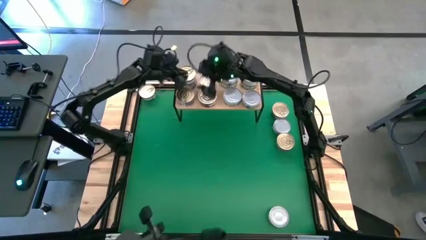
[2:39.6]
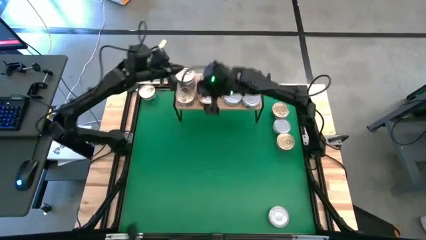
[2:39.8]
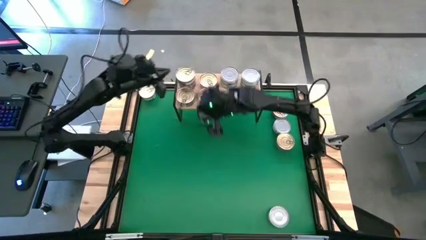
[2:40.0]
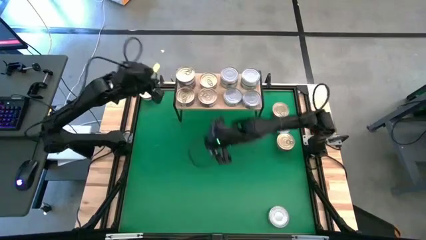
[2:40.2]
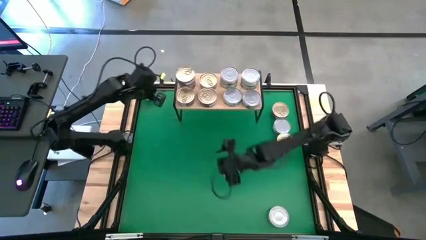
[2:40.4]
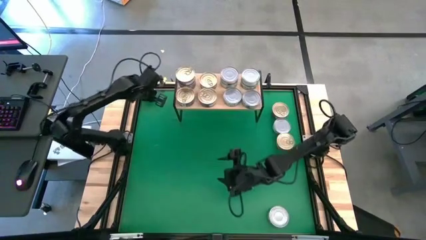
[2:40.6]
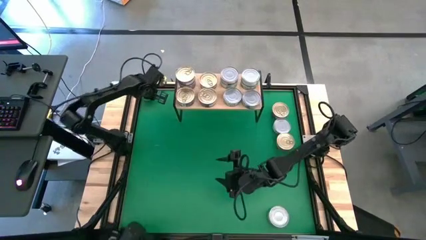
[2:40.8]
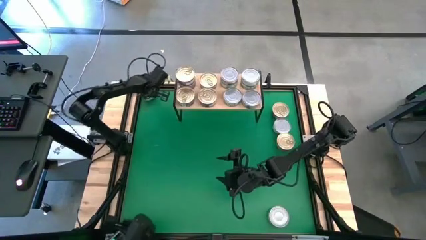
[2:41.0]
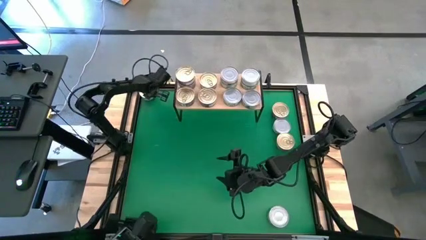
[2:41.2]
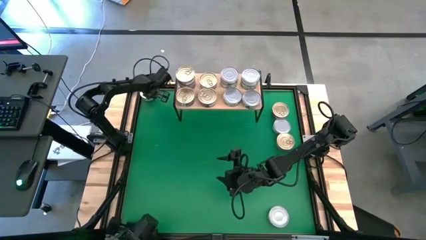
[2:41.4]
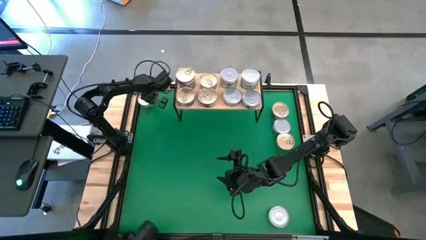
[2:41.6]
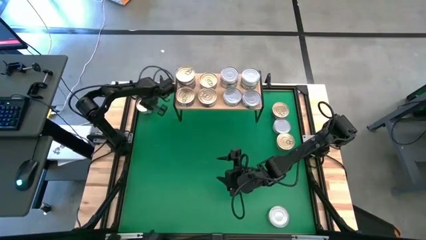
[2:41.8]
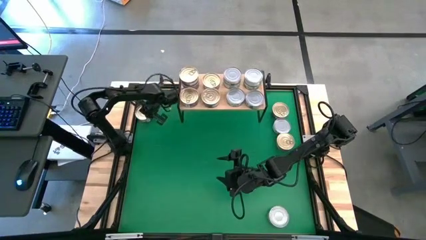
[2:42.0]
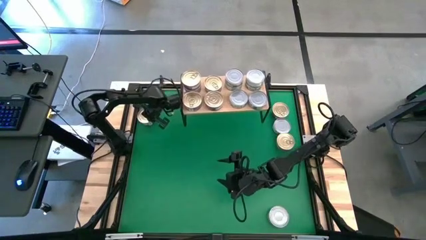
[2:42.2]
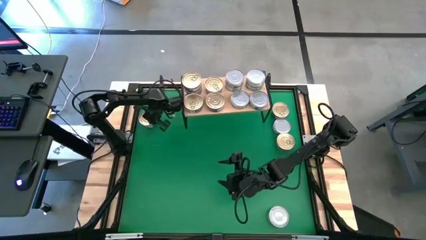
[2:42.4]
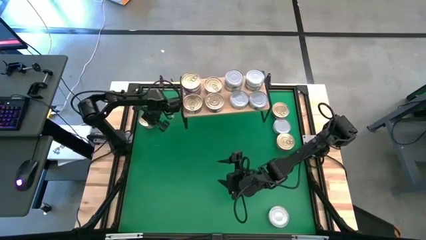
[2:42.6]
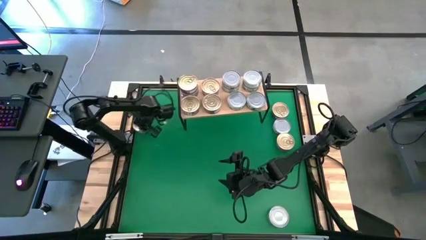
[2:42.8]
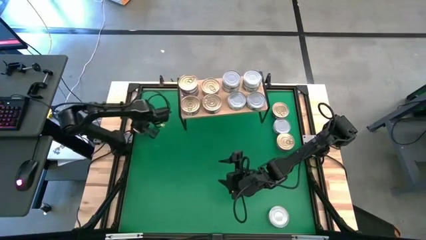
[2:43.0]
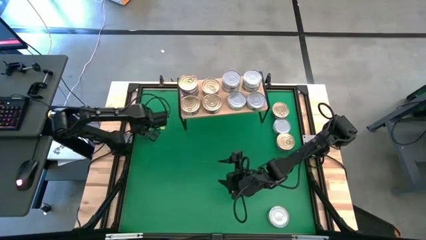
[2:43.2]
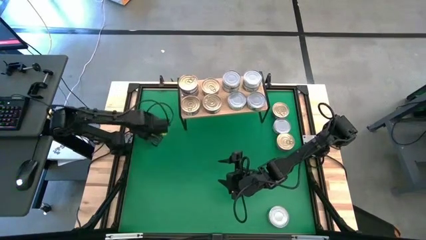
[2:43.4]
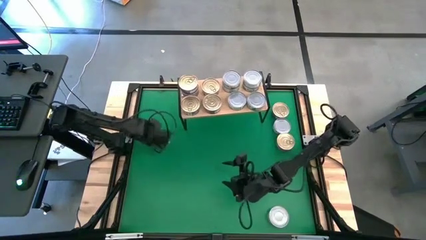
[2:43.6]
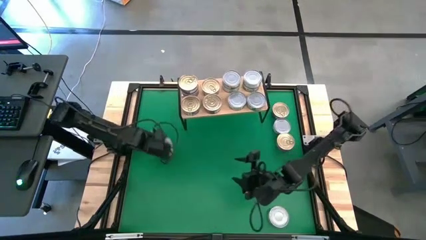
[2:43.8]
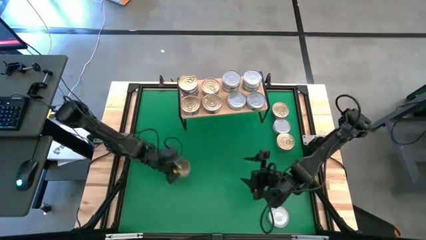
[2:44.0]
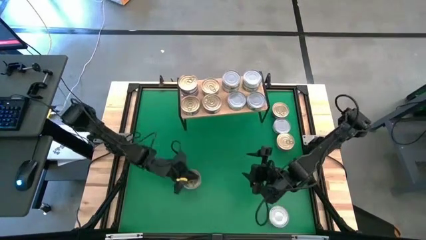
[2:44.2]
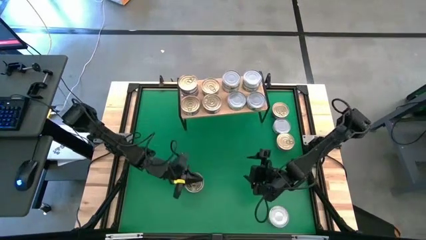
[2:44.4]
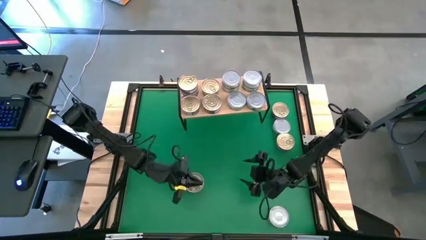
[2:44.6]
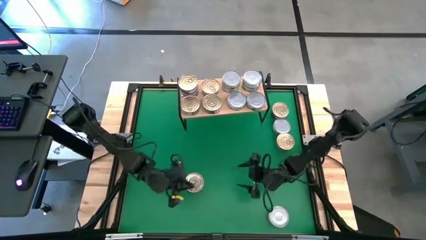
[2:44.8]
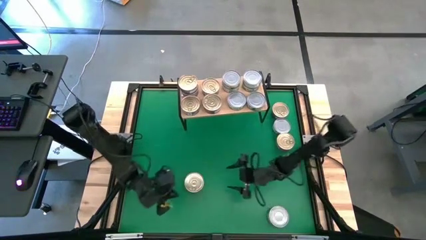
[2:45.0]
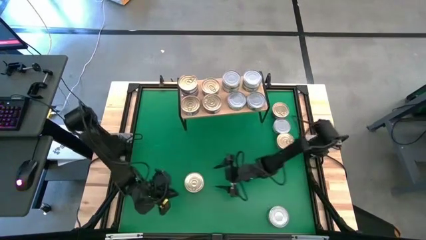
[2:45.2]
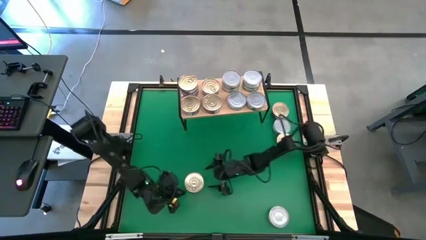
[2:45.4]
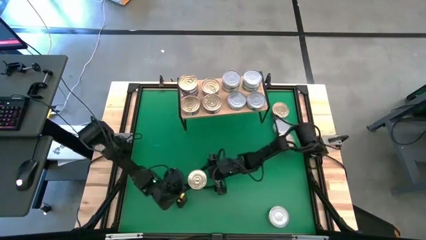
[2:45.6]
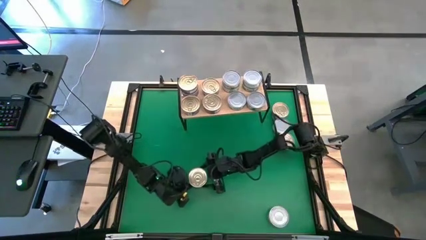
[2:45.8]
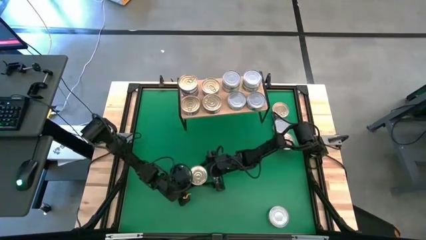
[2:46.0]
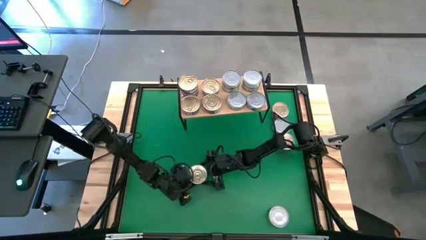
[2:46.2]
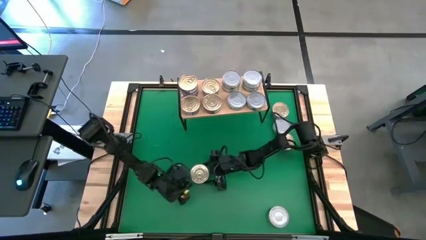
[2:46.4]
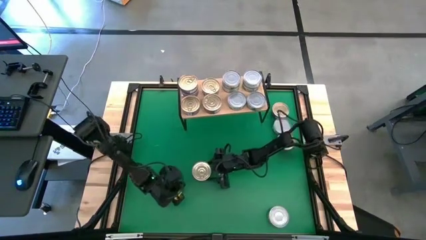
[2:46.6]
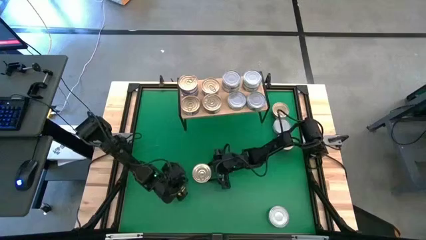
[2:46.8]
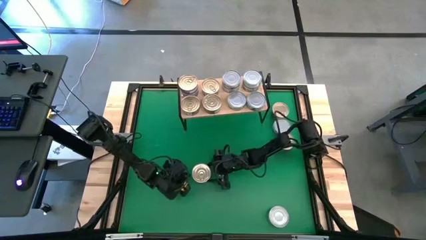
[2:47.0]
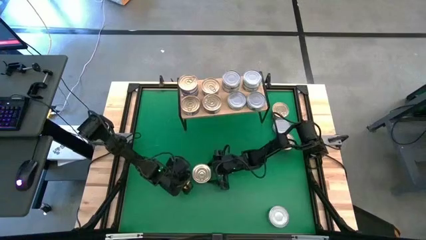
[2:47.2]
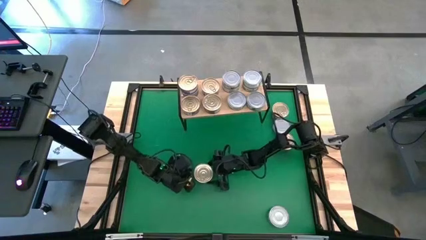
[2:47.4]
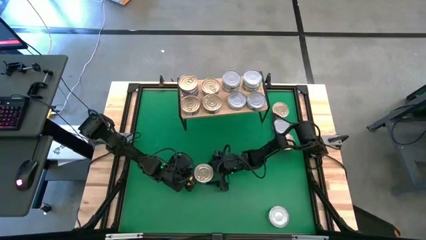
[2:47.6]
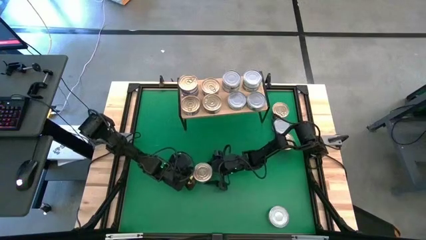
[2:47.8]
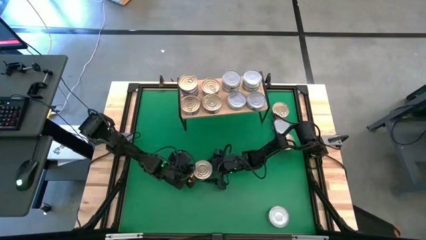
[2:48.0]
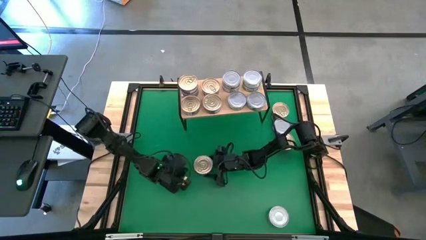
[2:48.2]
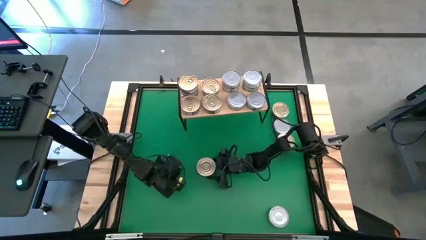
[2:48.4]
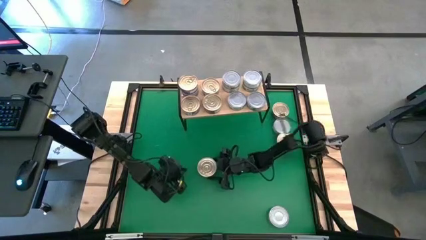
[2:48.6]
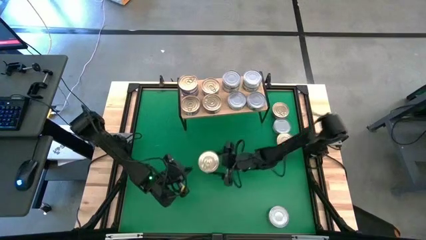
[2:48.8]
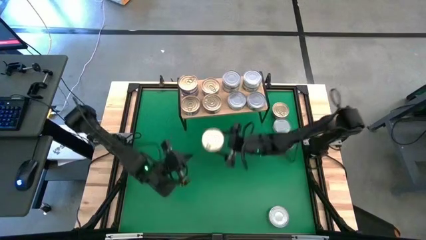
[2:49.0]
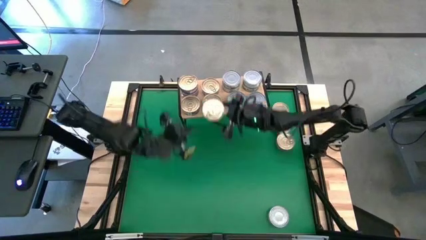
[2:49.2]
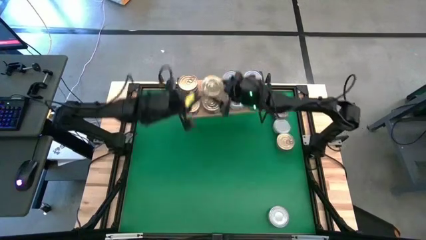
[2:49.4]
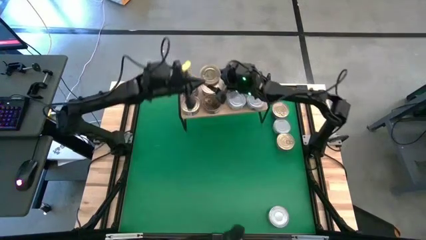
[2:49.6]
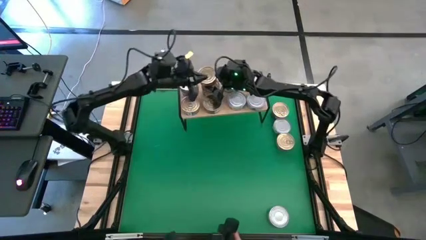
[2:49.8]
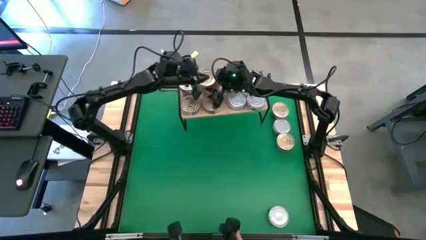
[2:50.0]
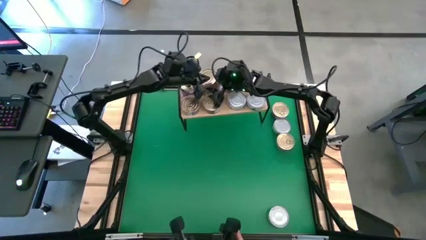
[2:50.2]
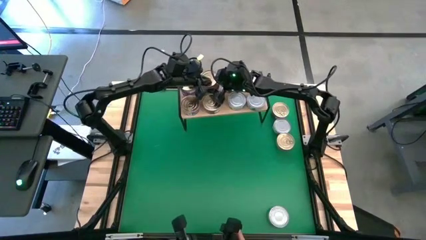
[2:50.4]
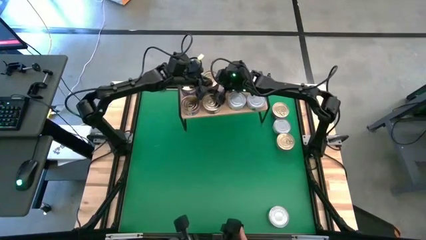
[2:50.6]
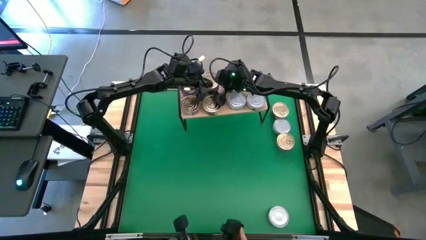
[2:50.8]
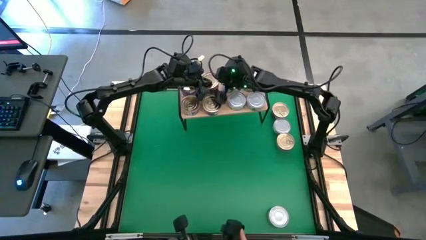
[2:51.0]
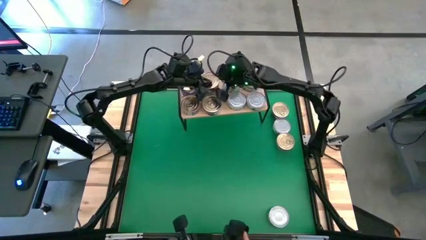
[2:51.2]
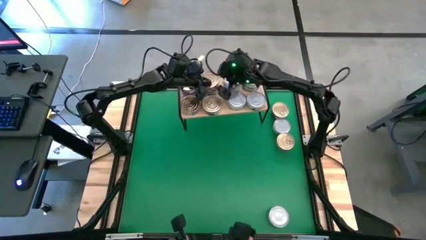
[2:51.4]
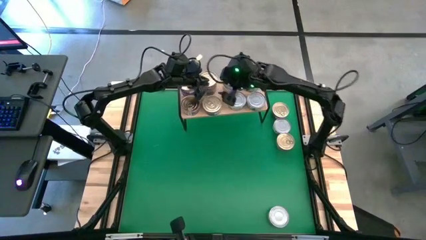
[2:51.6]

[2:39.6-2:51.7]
Task: Stack canned seafood by type on shelf
Stack the blue tuna can on top of the other blue tuna can on the shelf

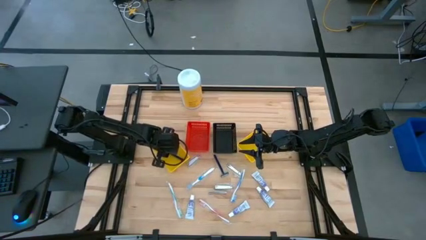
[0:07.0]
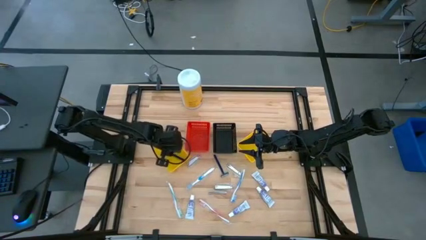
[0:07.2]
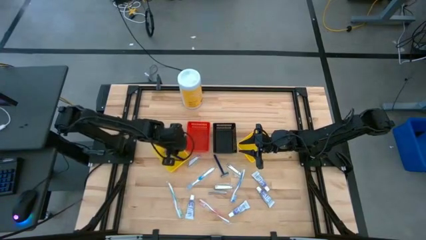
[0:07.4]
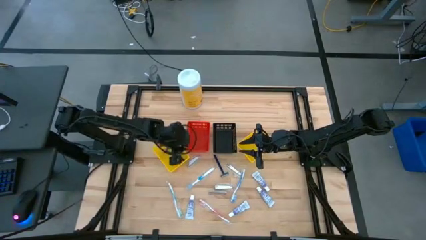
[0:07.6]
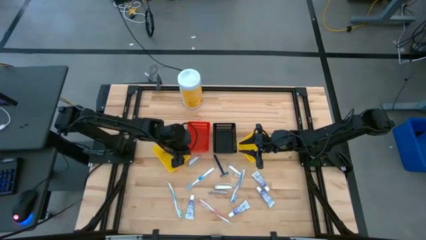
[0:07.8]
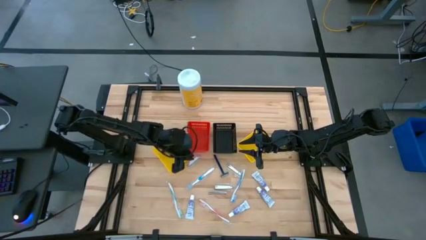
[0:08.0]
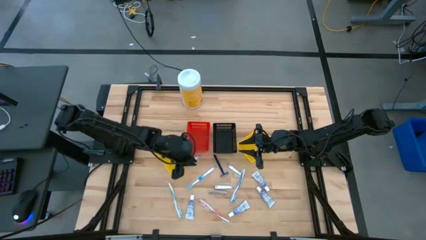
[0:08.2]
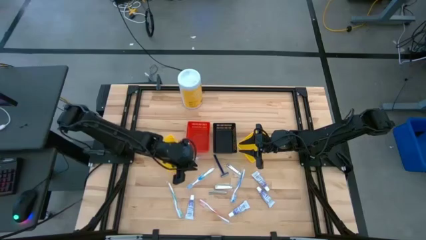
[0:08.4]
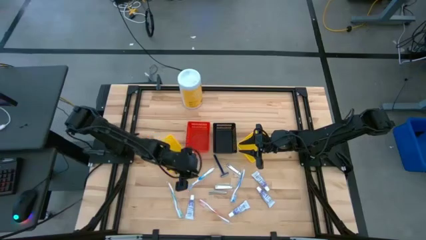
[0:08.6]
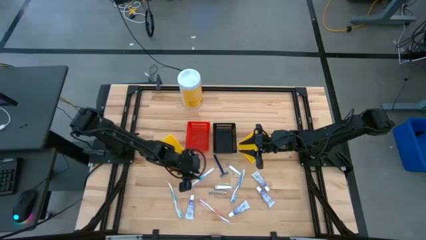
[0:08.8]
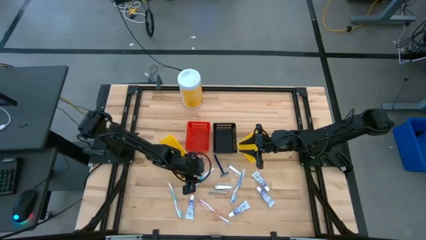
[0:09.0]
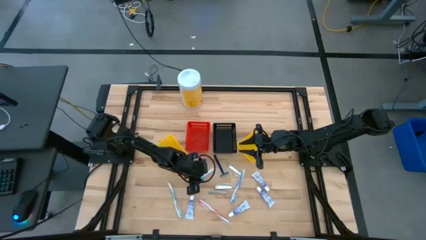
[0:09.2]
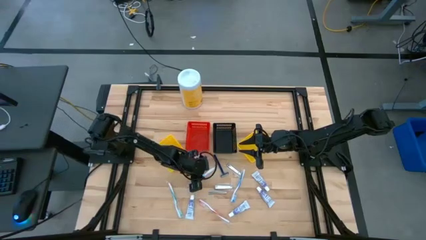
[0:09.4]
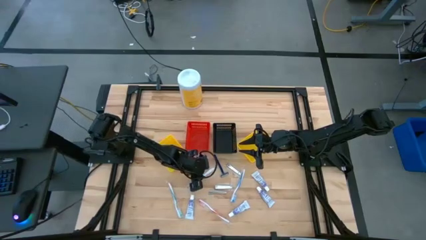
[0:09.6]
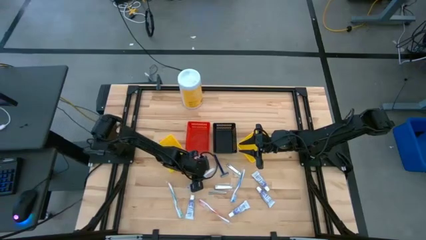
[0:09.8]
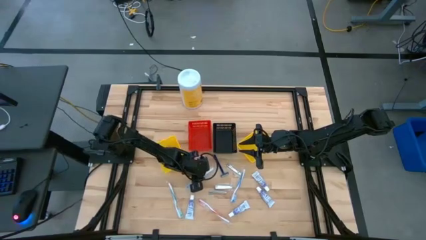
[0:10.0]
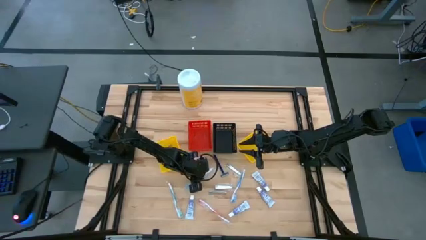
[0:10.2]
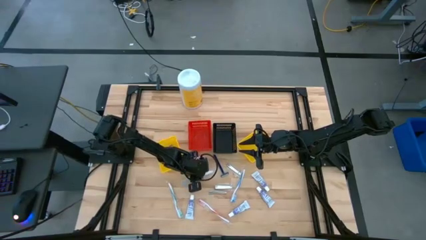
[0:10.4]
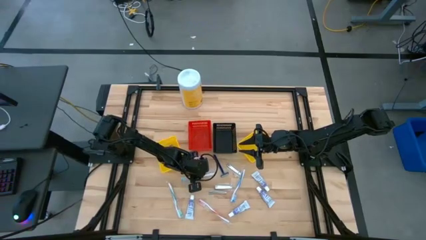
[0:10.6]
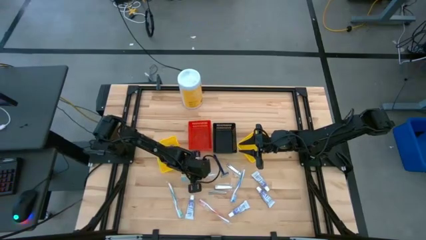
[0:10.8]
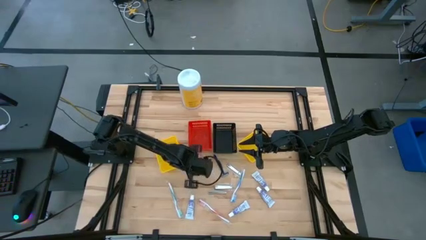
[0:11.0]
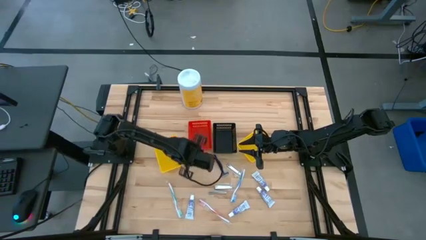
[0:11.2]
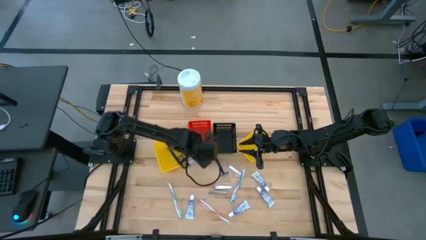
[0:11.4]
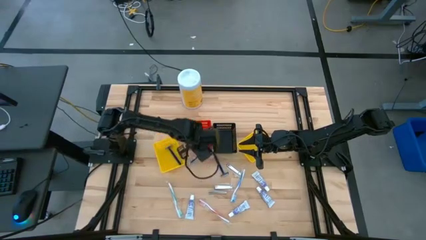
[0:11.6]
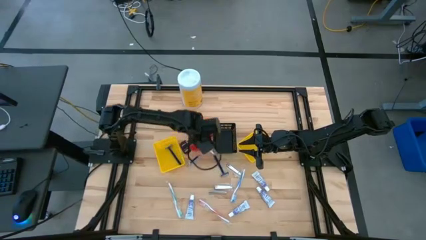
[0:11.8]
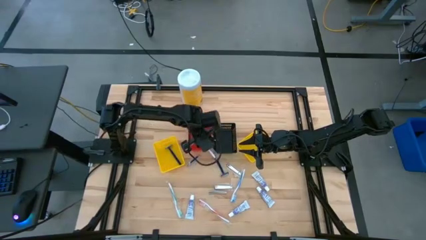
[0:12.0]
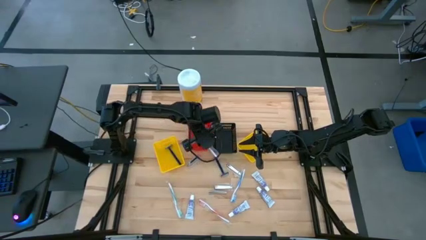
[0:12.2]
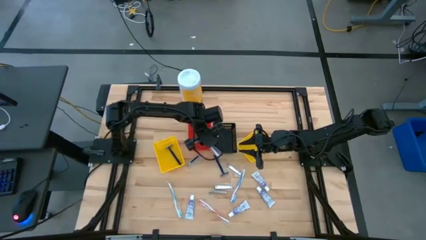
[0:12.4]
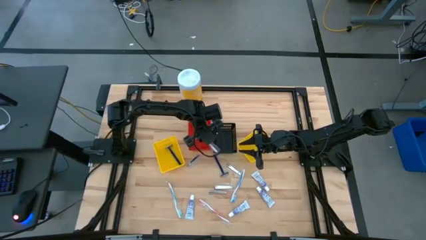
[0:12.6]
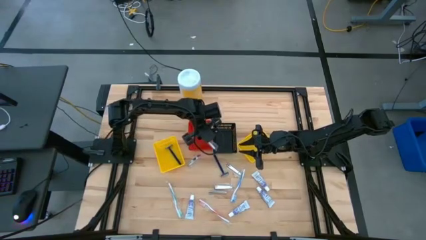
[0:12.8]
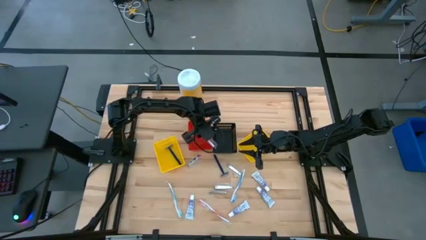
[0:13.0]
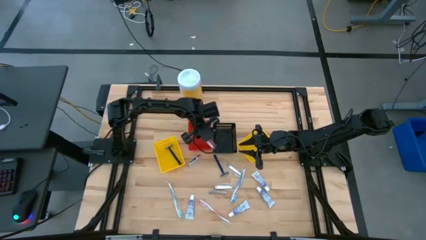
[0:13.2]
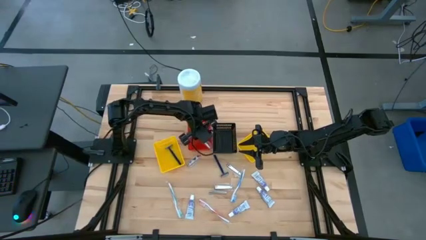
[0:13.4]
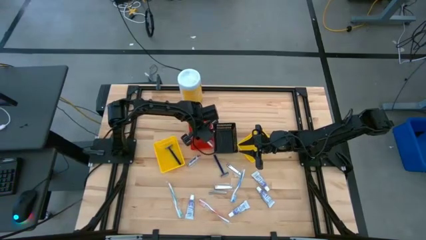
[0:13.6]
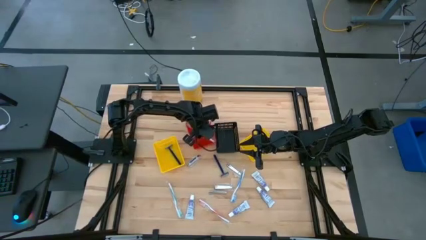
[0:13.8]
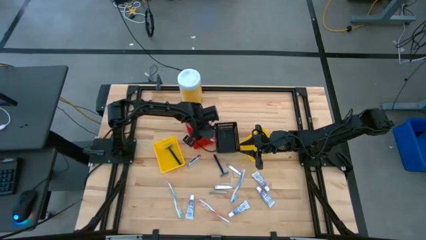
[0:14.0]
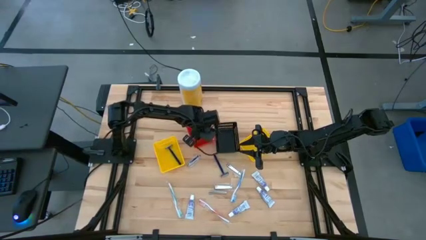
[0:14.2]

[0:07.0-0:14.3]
Task: Pick & Place Travel size toiletries
Put the blue toothbrush into the red bin
